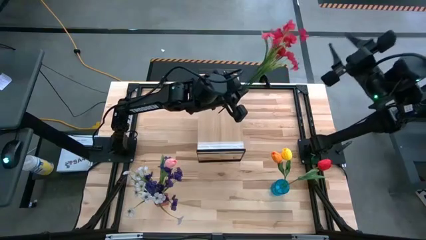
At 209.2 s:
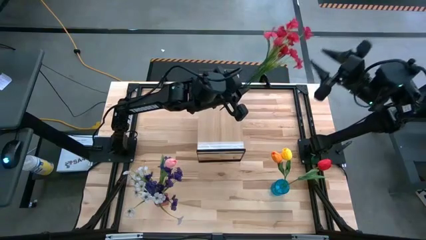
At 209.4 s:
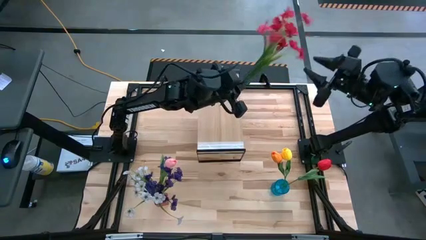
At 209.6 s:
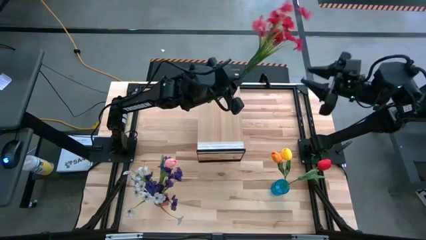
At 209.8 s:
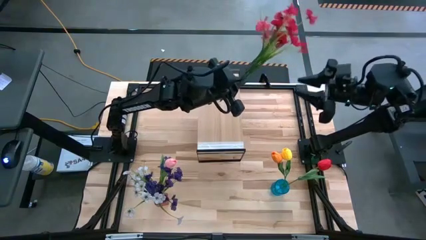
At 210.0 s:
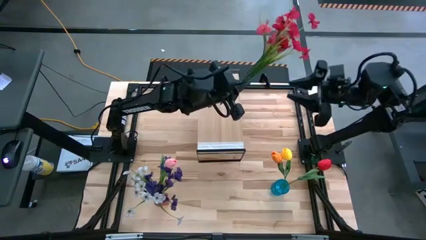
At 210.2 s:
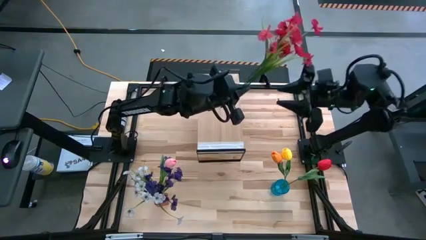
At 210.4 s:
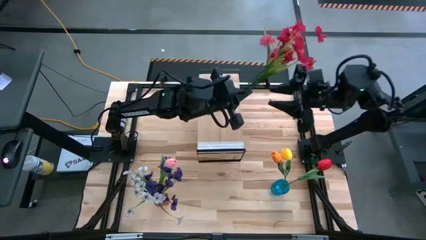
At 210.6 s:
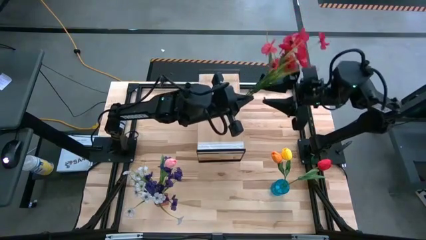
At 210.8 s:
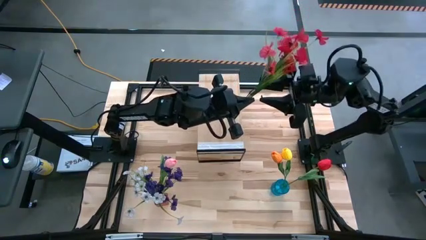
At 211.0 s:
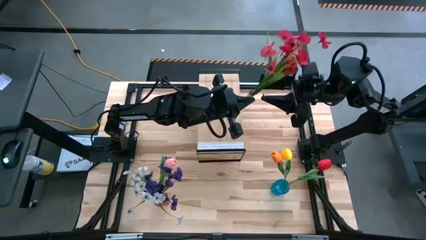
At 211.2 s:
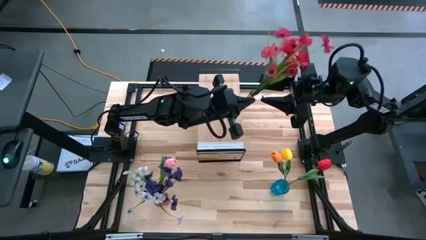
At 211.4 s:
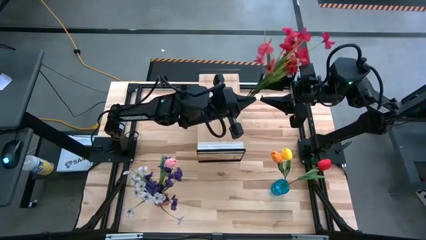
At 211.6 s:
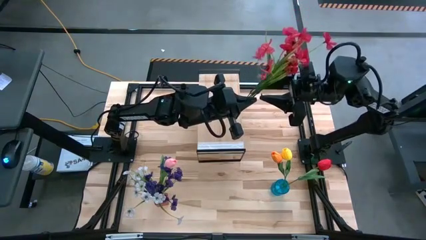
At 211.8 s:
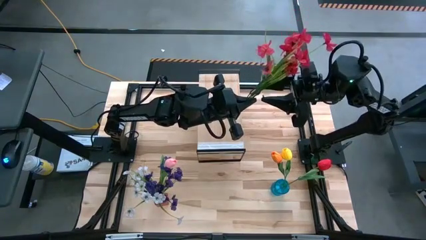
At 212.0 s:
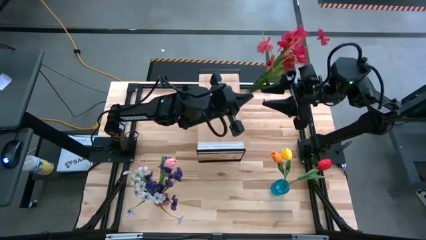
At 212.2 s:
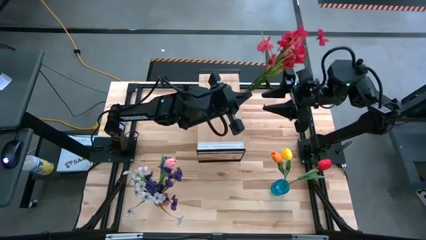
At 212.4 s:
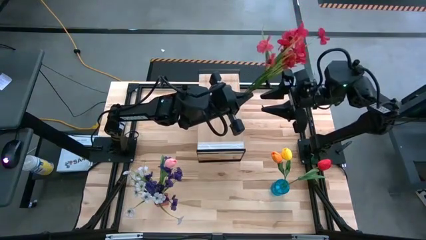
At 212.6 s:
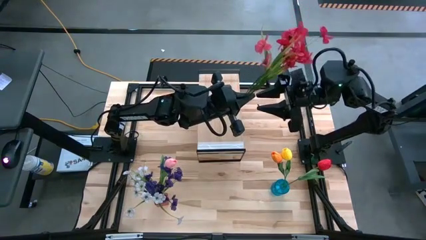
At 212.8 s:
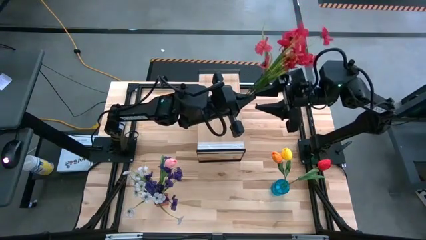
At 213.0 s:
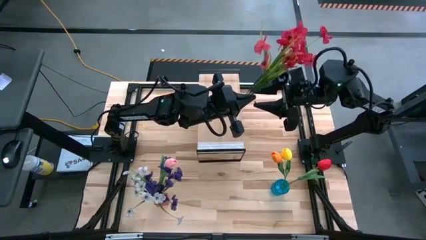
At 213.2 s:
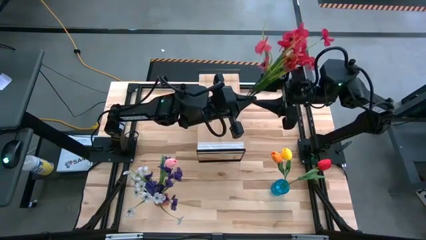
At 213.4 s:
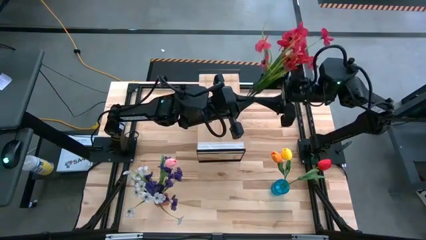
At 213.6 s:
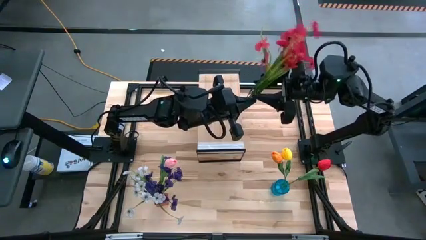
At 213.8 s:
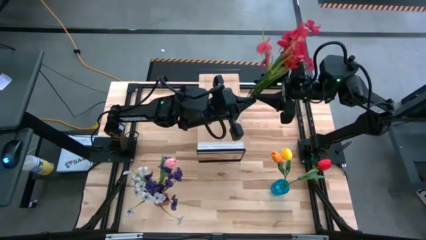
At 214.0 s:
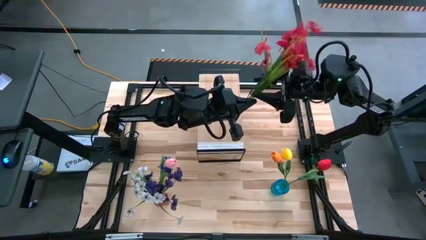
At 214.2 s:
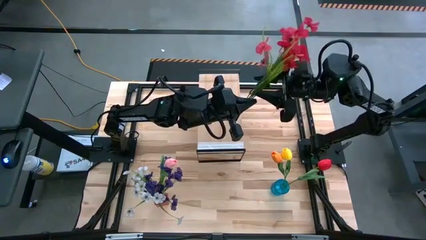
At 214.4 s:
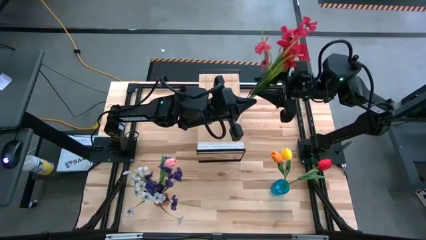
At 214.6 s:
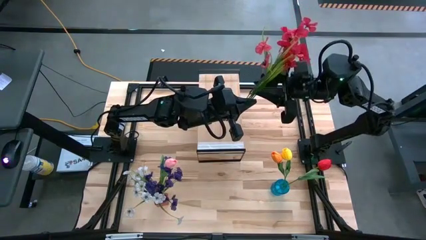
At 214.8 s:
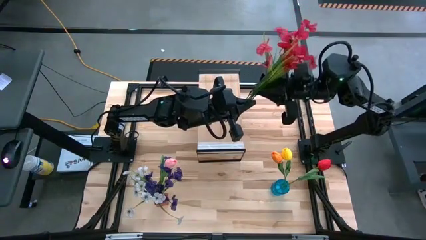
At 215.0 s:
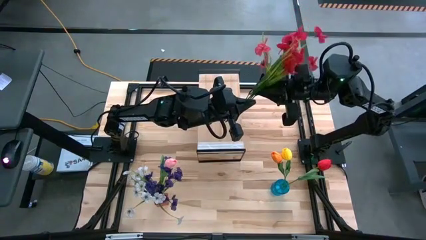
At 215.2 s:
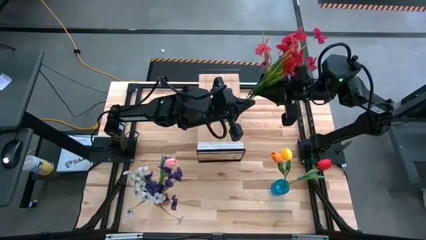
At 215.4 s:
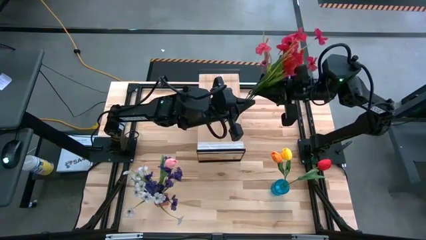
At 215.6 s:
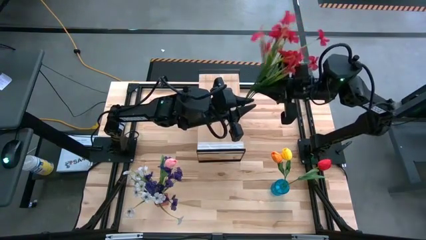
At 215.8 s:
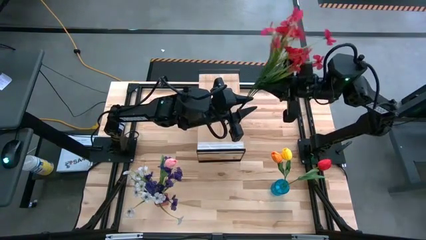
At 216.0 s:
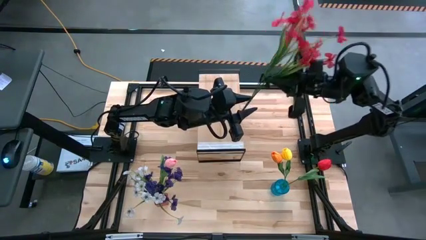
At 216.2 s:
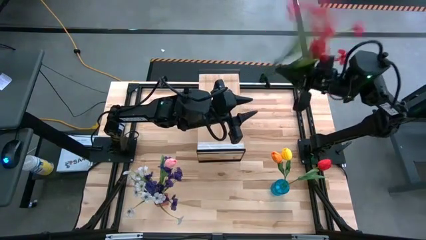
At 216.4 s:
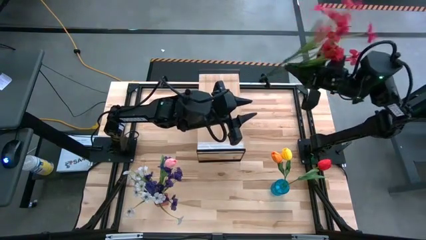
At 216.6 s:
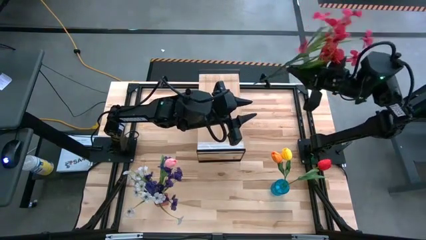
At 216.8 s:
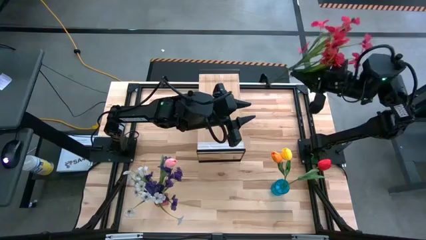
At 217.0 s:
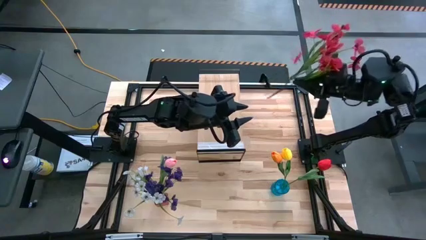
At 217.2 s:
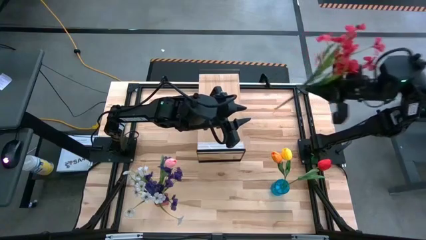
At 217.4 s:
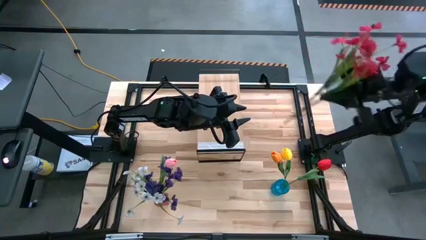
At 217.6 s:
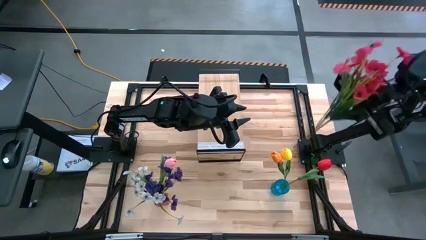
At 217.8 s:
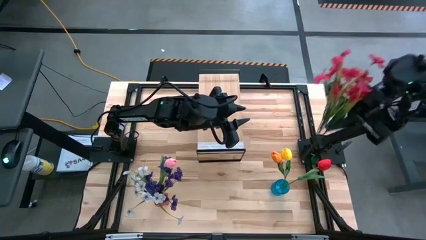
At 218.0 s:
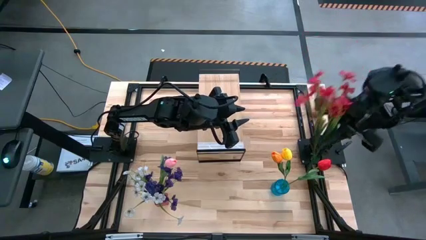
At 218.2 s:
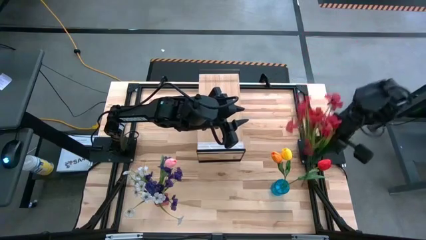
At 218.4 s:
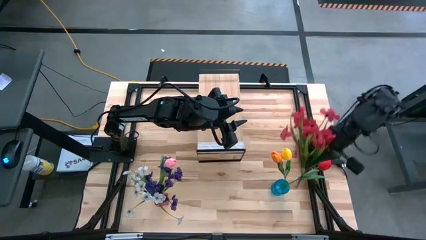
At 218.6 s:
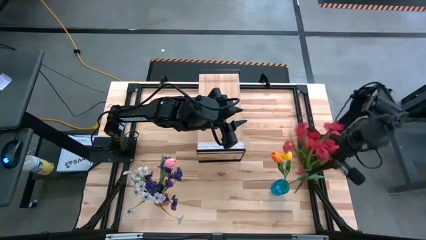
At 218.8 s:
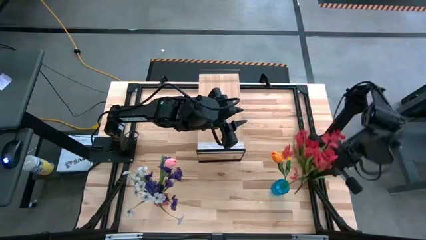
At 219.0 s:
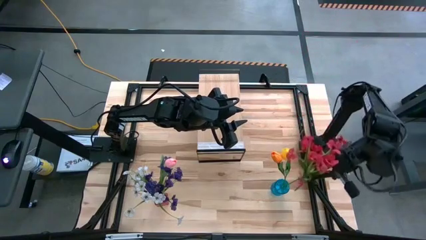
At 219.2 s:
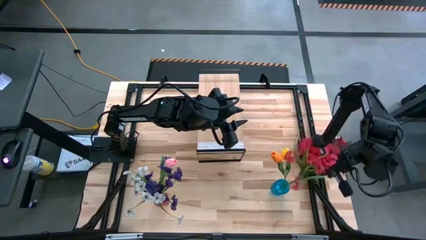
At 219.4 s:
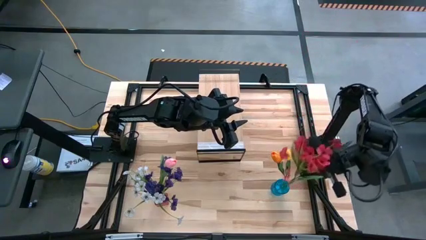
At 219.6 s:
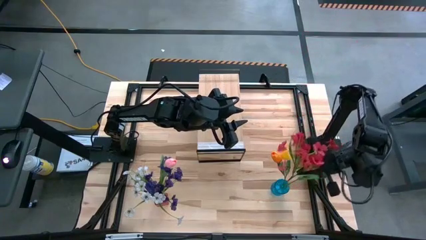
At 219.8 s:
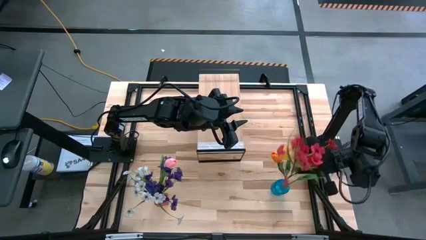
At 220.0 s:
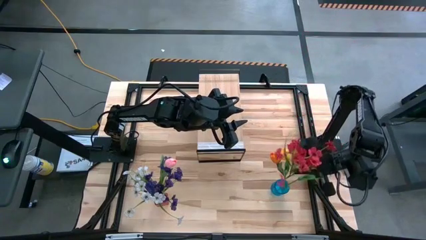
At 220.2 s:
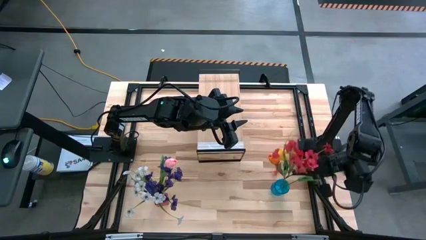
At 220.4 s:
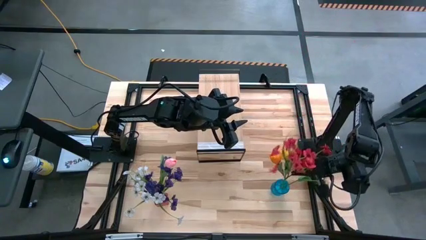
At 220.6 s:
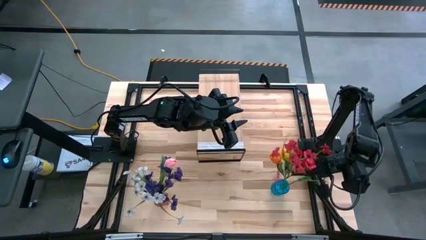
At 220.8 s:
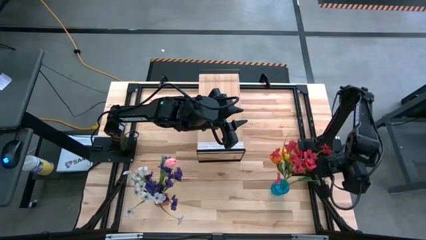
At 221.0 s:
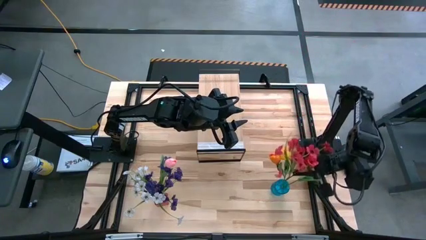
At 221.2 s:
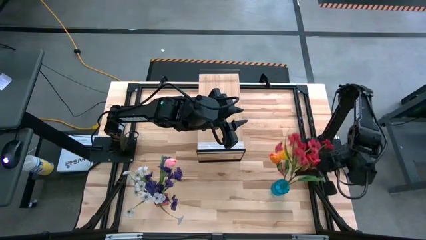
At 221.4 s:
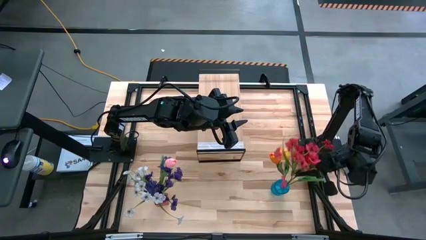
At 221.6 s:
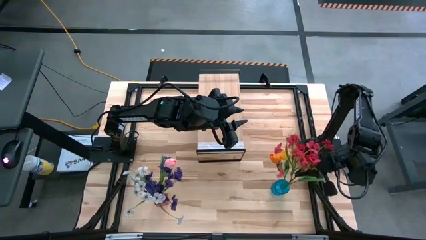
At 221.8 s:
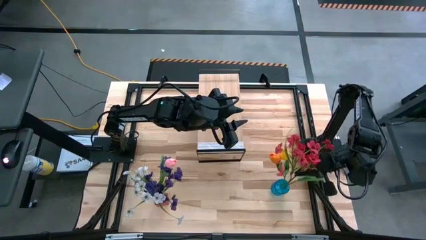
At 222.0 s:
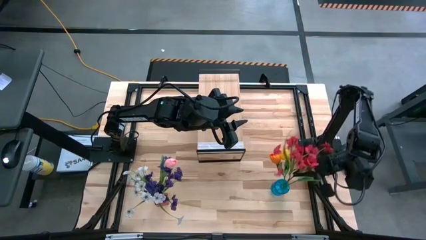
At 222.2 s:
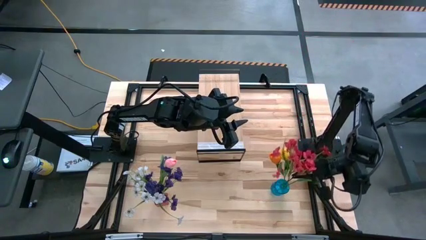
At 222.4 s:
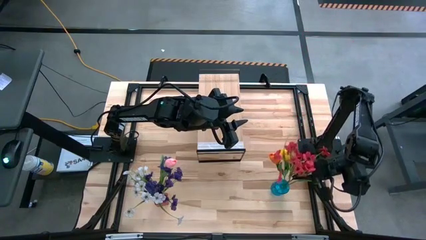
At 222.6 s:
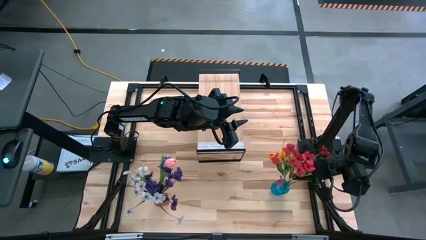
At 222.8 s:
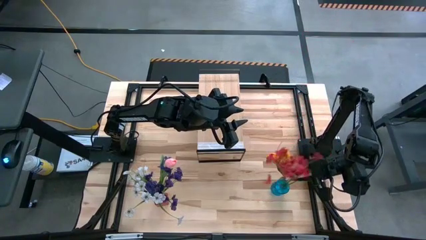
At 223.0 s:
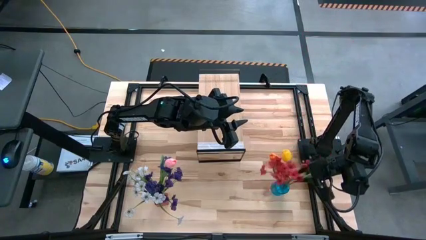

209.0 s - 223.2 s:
Task: Pick and place flowers into a vace then onto a shelf
Put the red flowers into the blue vase
